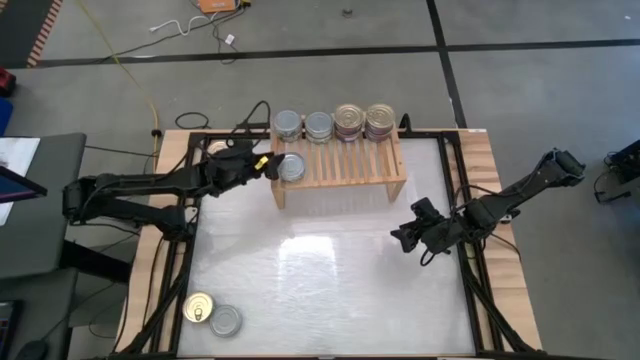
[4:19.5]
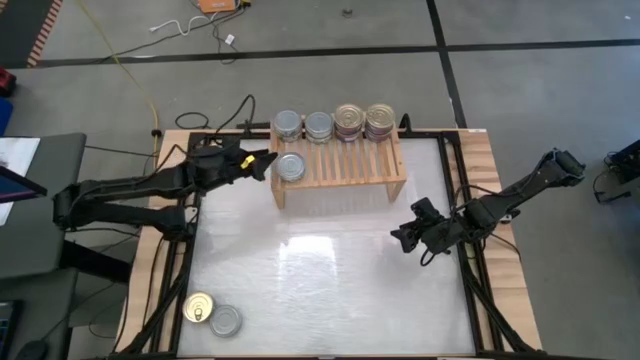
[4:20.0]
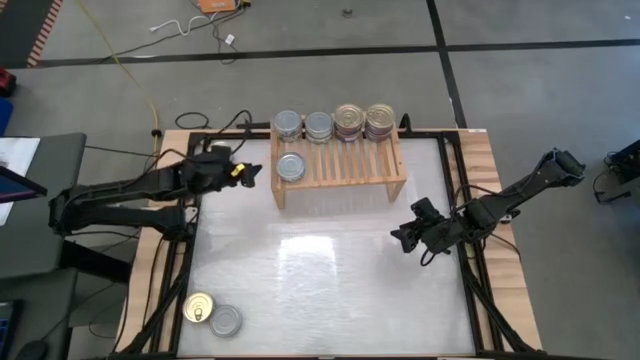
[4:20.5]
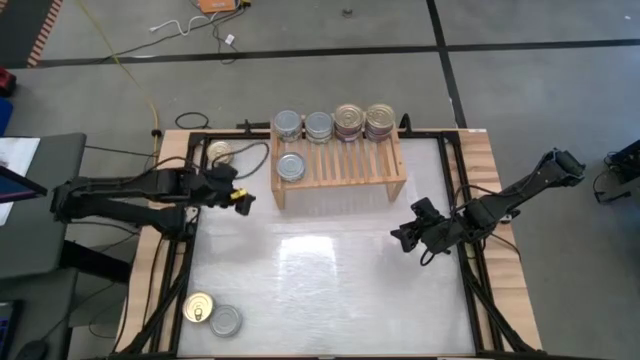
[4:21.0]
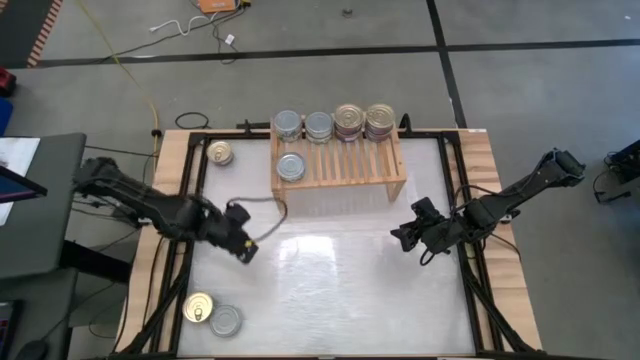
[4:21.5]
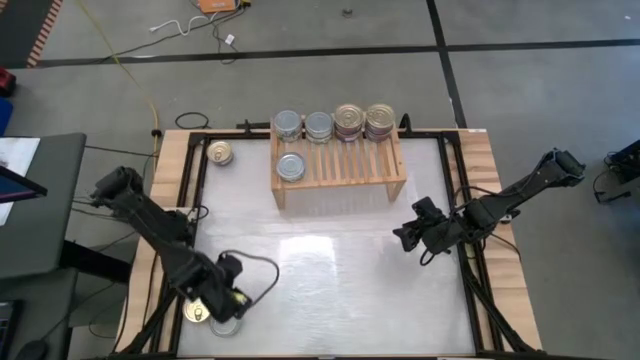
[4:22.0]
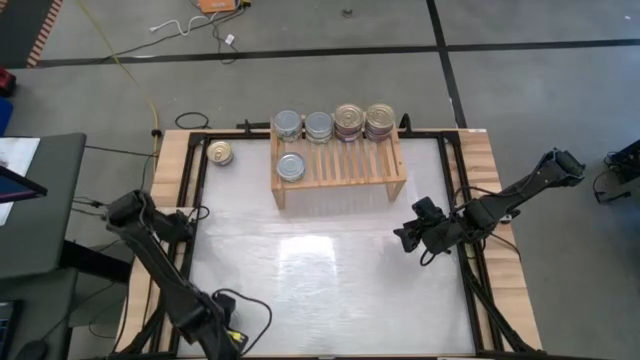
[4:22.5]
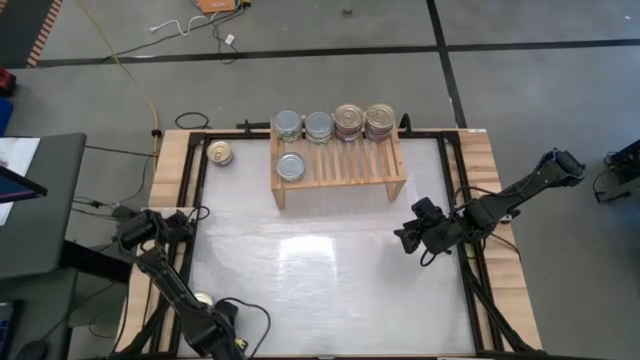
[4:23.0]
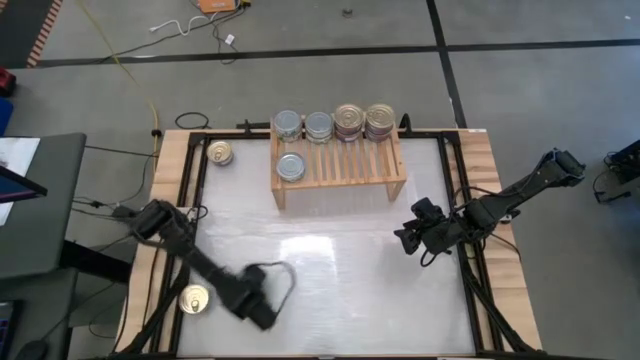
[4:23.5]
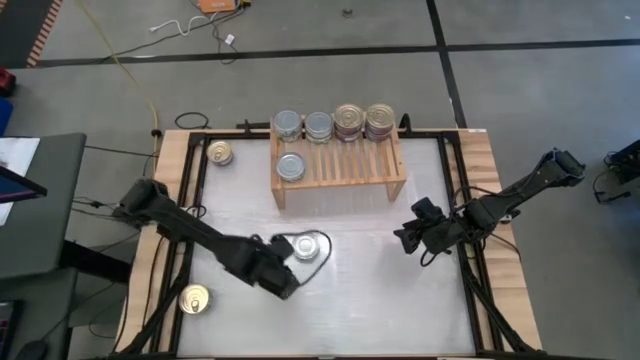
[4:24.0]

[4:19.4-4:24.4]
Task: Stack canned seafood by type on shelf
Move the green tuna can to the center of the table

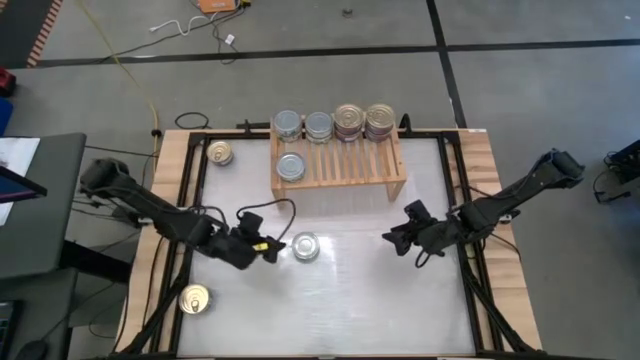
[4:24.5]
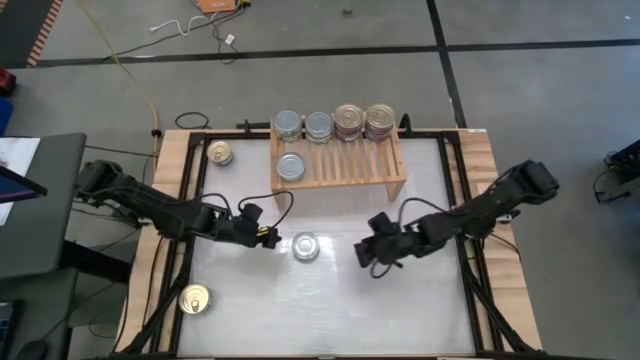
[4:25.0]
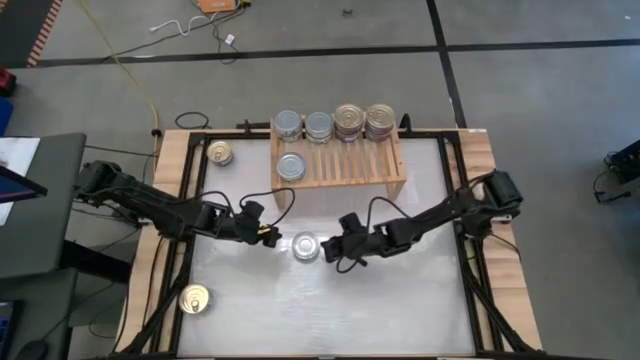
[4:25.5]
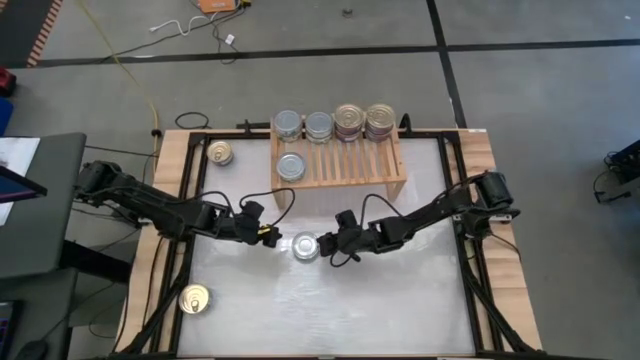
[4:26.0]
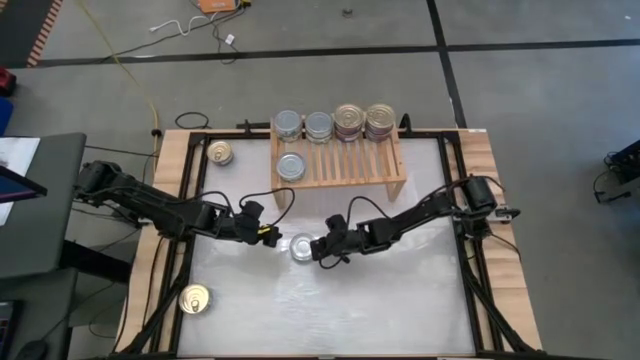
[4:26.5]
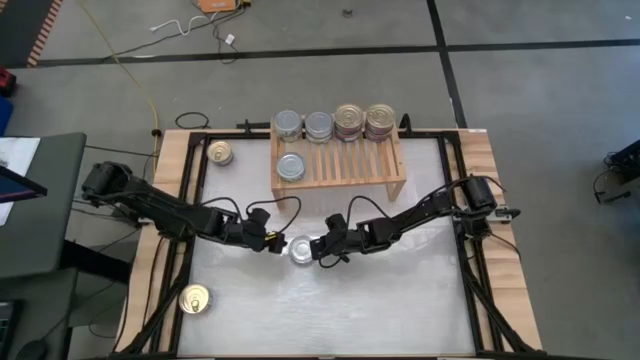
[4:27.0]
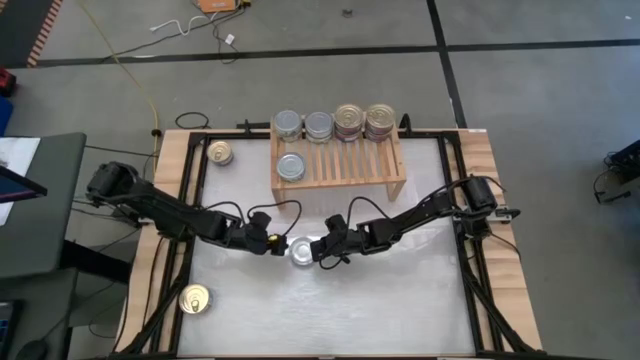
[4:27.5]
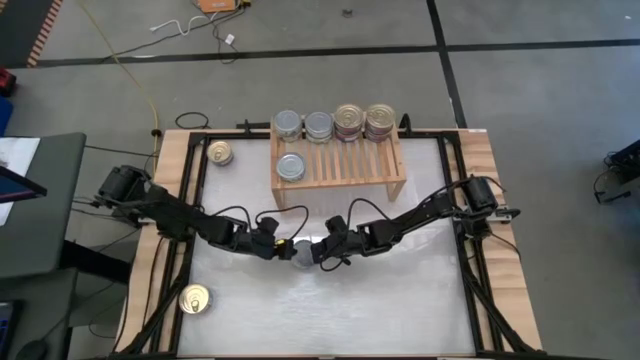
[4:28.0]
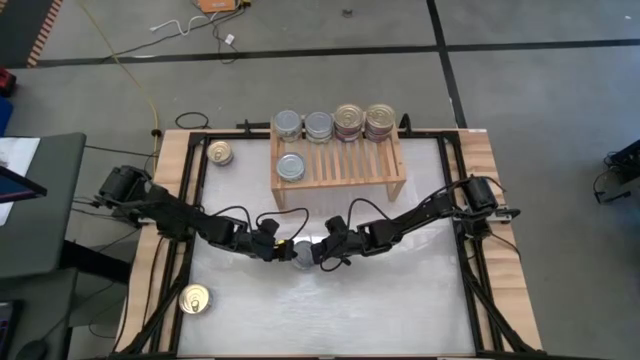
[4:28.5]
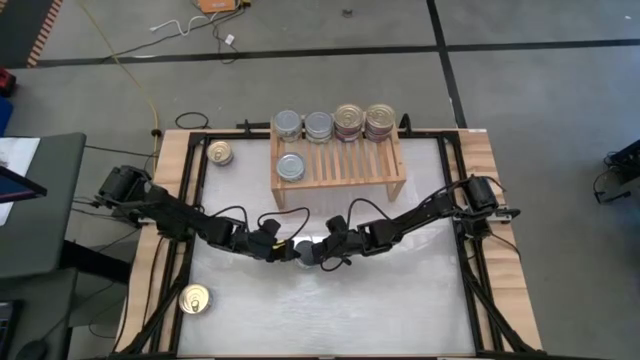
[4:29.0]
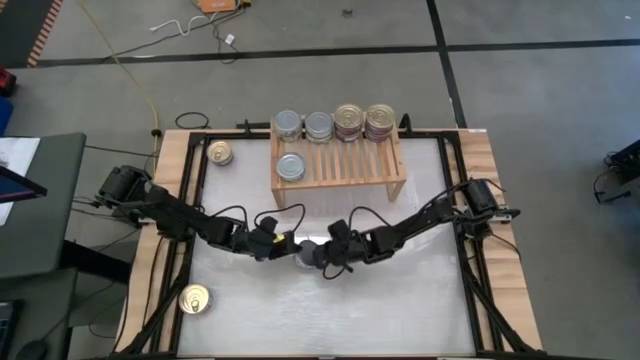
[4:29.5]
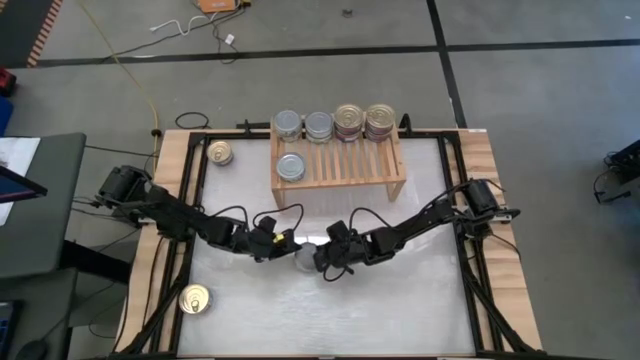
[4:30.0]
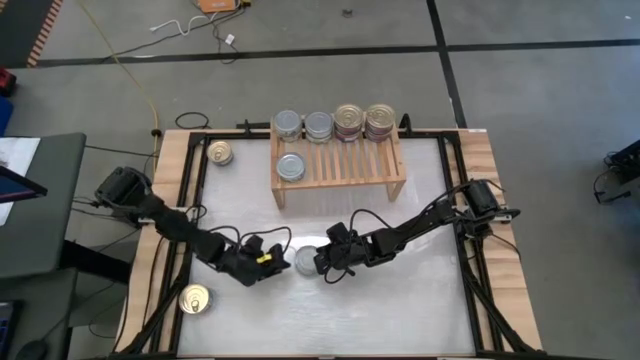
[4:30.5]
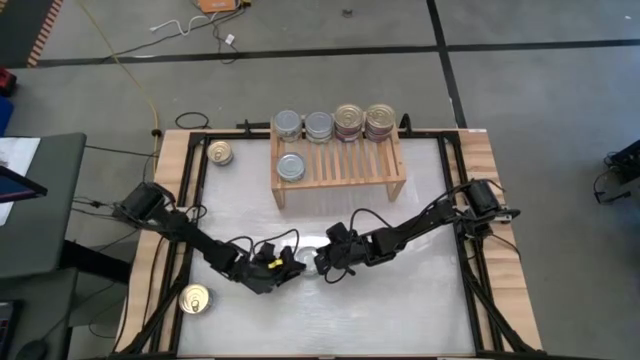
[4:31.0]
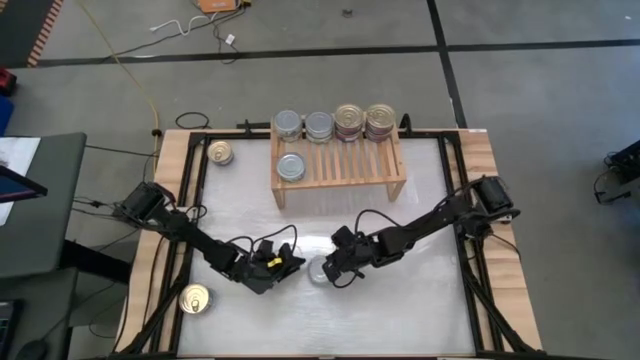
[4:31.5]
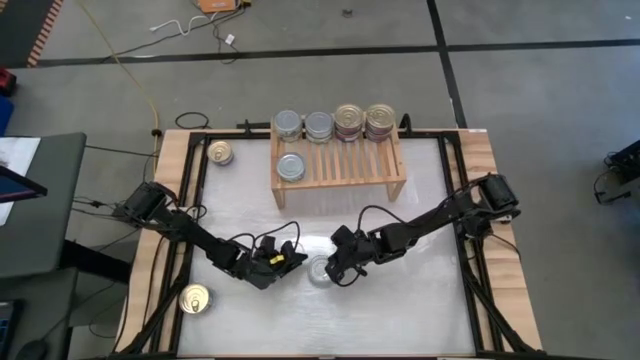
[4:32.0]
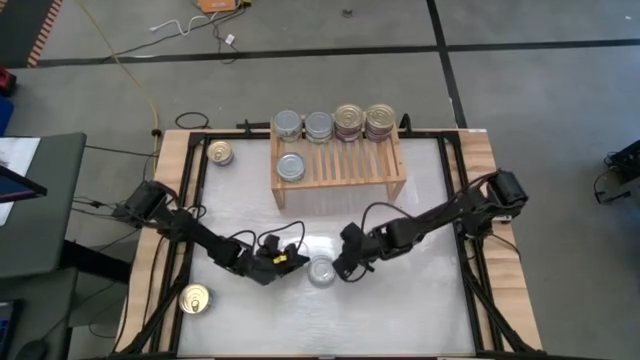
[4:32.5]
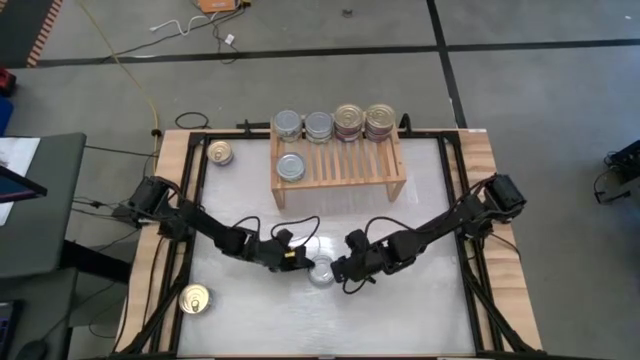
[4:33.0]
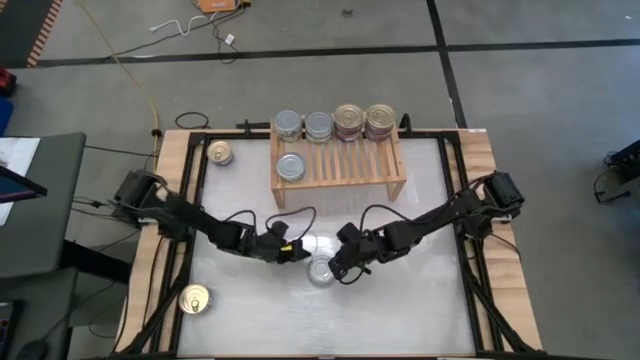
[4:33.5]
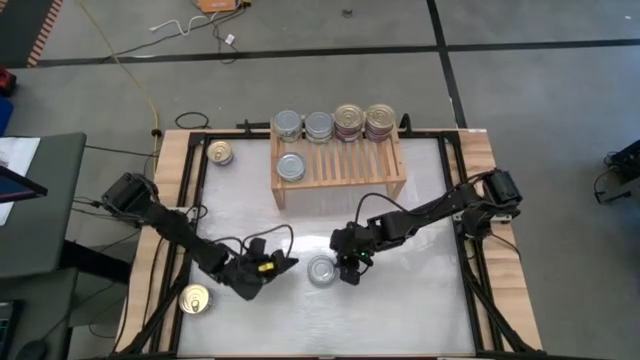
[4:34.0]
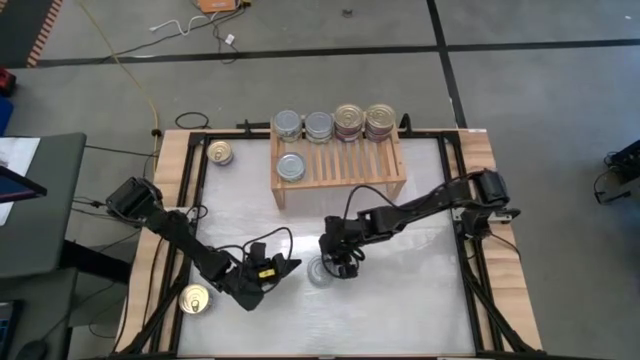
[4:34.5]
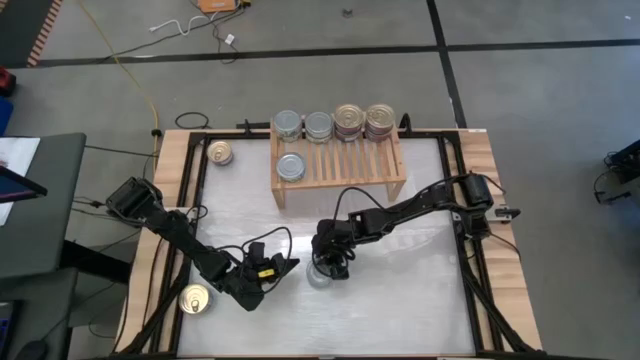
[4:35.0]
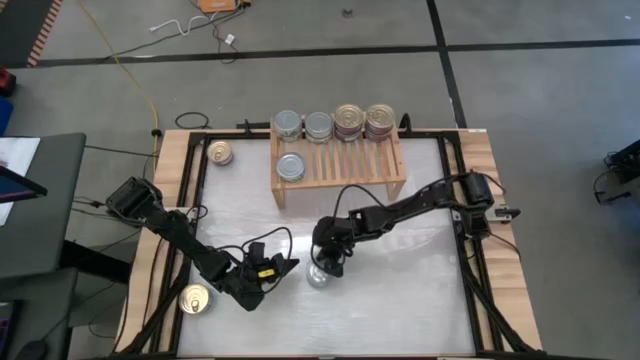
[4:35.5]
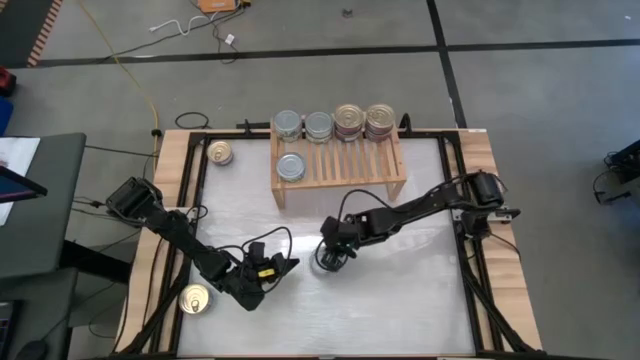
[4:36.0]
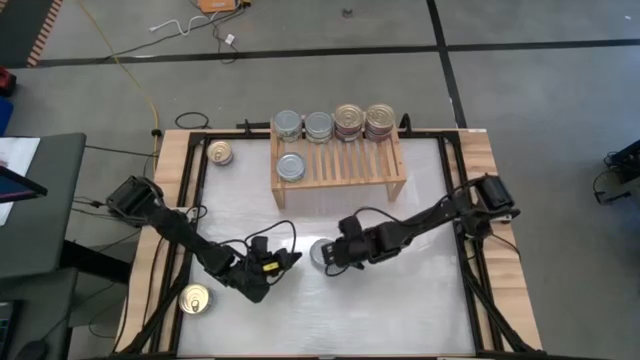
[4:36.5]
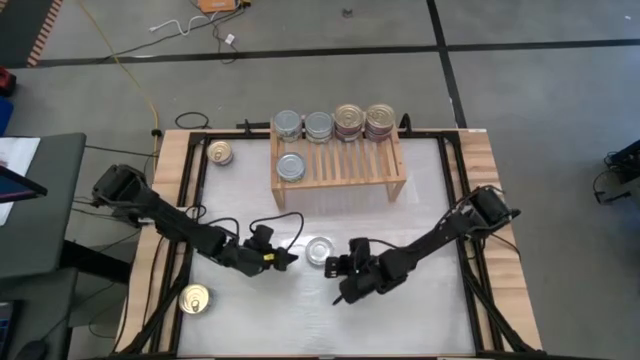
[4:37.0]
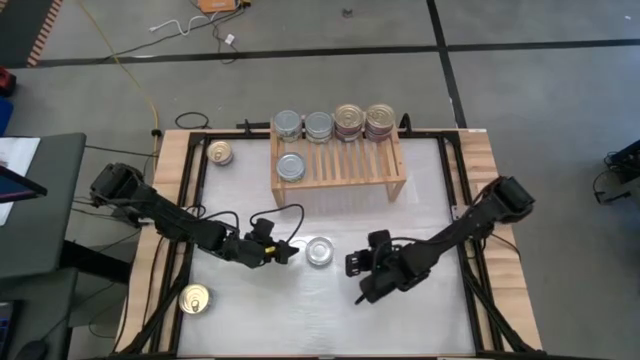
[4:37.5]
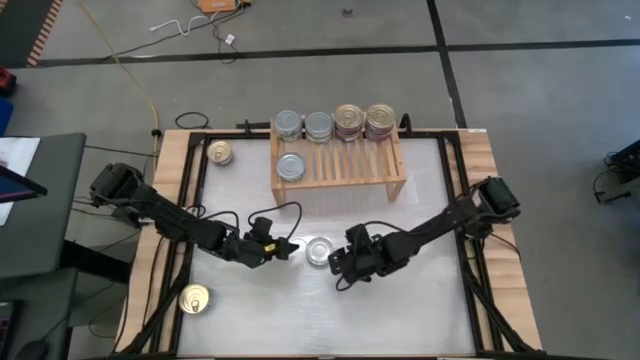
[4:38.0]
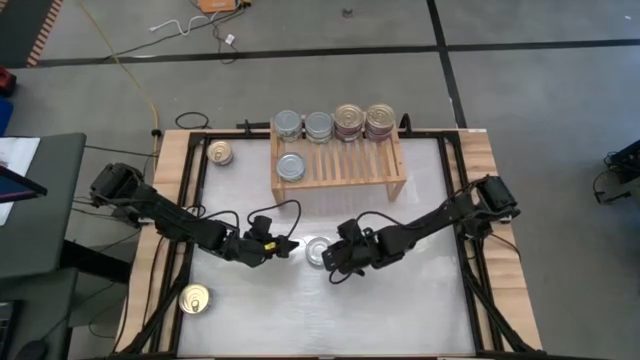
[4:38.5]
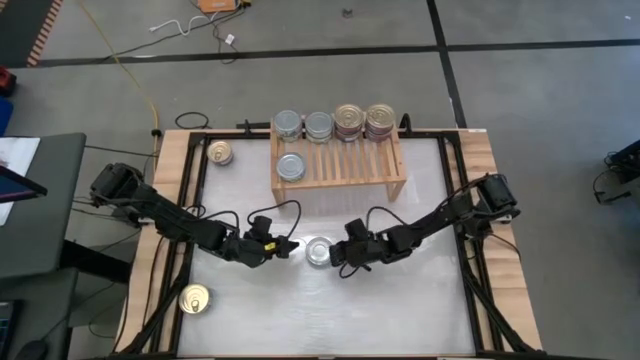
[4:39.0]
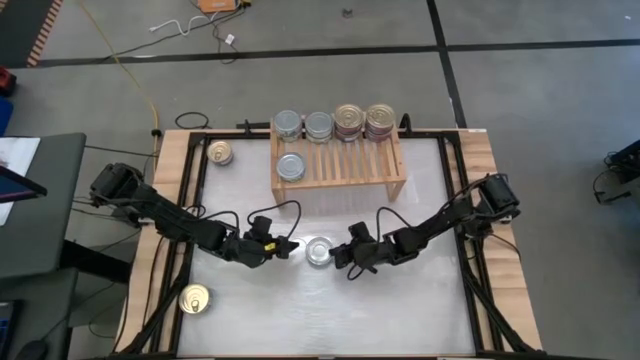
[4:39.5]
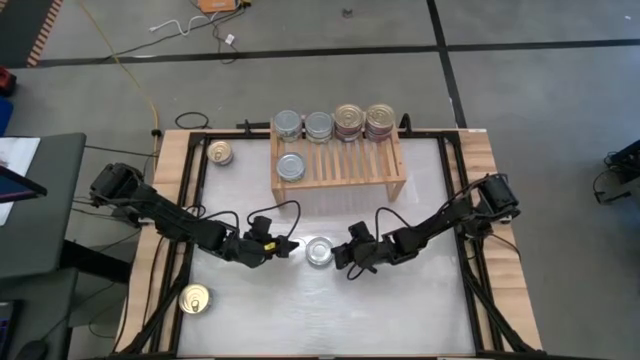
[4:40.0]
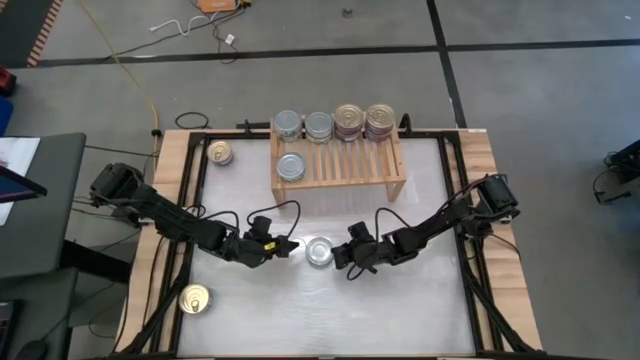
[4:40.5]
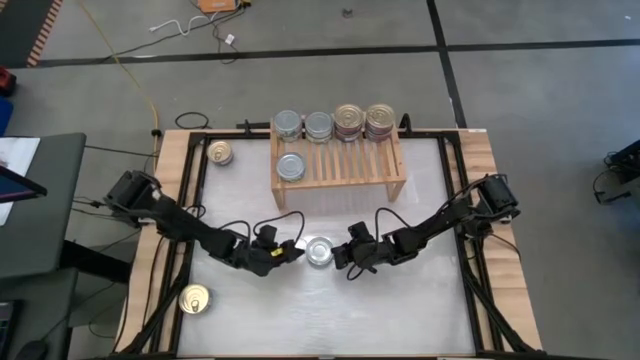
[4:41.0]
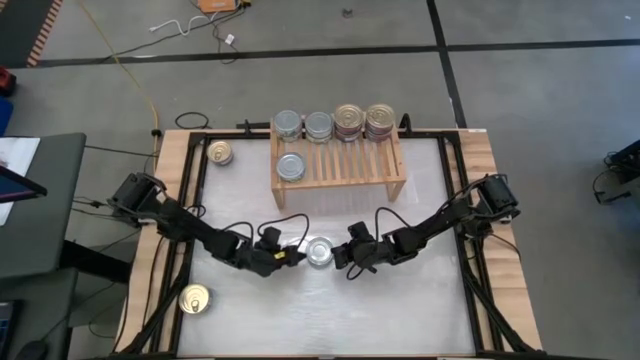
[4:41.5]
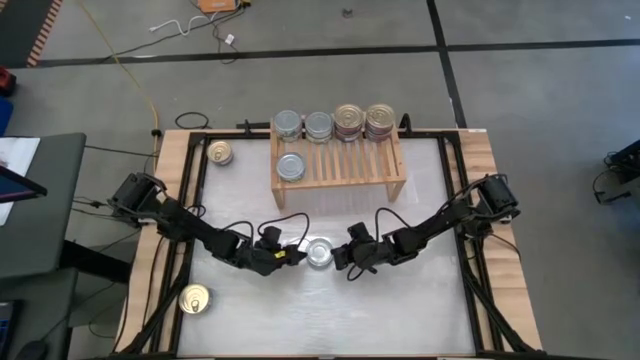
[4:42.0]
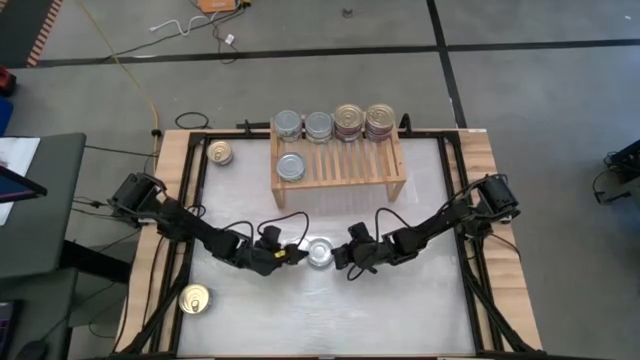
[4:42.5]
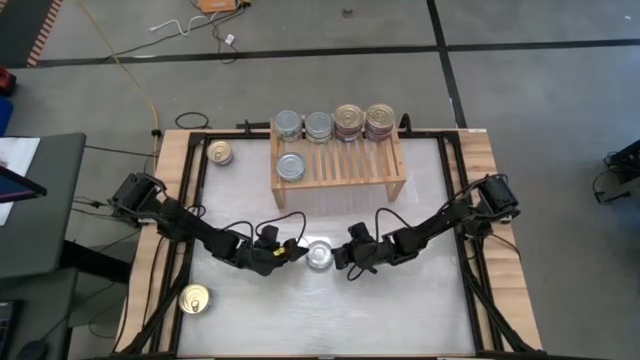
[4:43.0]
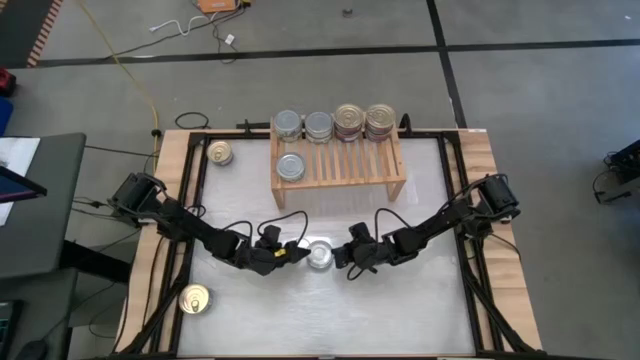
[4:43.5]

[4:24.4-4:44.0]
Stack the green tuna can on top of the green tuna can on the shelf
